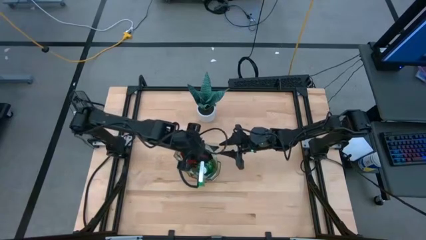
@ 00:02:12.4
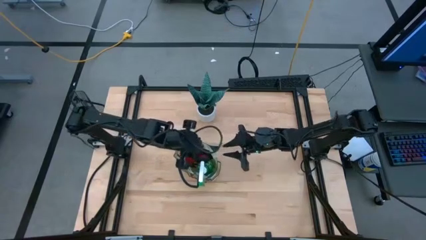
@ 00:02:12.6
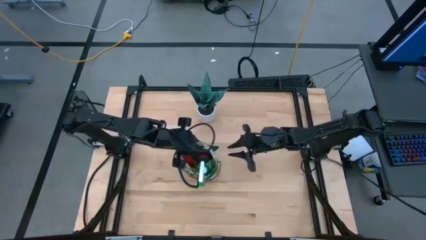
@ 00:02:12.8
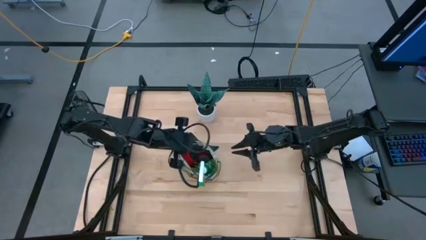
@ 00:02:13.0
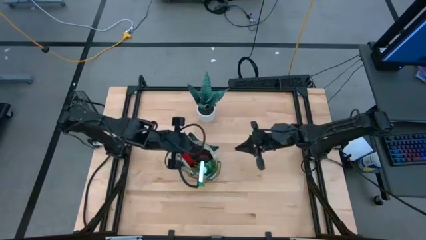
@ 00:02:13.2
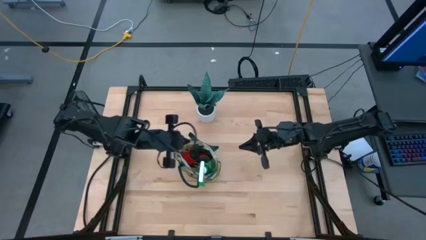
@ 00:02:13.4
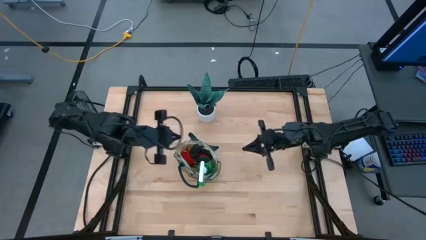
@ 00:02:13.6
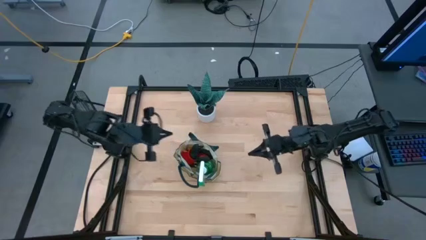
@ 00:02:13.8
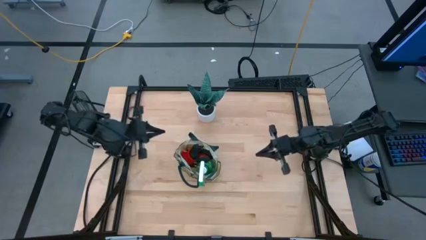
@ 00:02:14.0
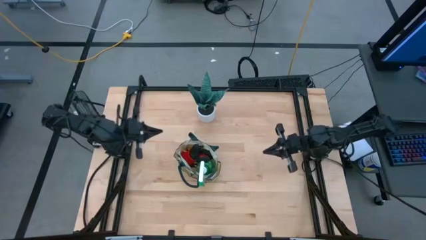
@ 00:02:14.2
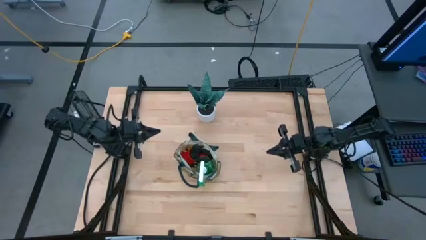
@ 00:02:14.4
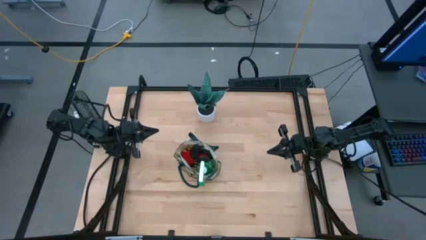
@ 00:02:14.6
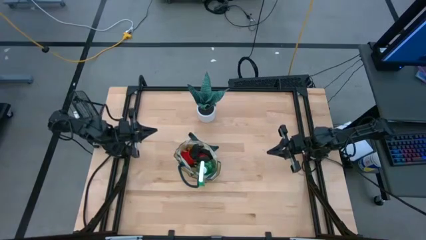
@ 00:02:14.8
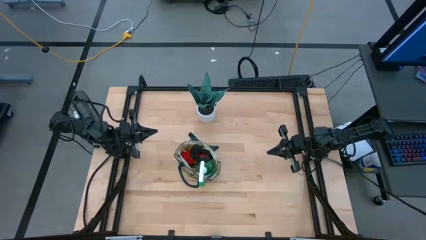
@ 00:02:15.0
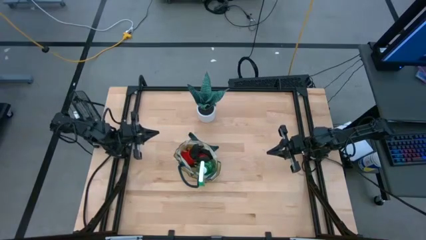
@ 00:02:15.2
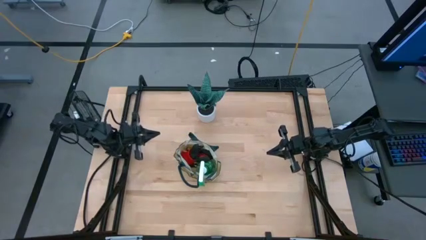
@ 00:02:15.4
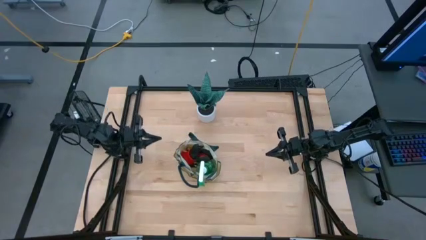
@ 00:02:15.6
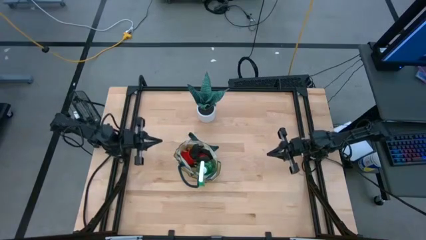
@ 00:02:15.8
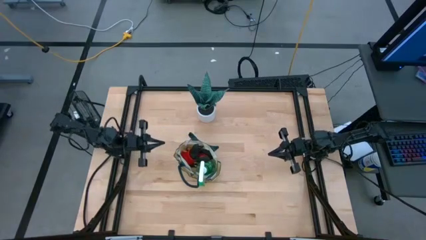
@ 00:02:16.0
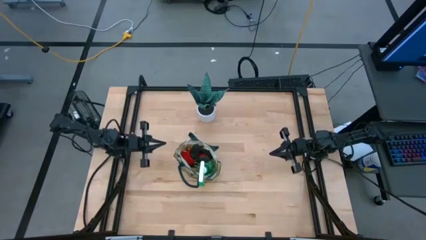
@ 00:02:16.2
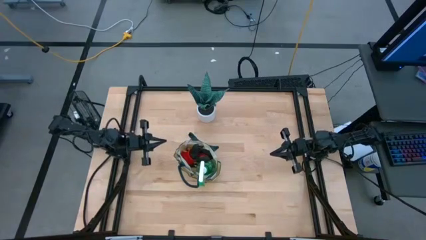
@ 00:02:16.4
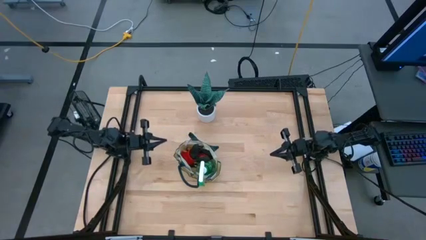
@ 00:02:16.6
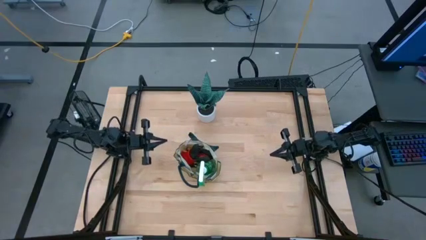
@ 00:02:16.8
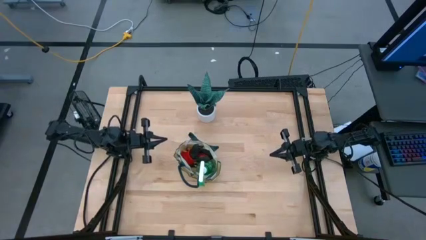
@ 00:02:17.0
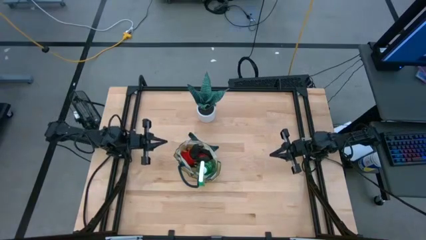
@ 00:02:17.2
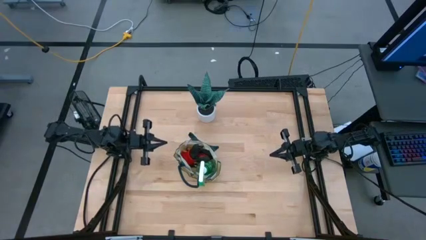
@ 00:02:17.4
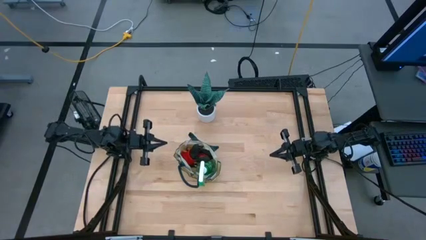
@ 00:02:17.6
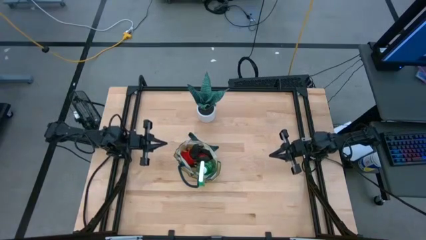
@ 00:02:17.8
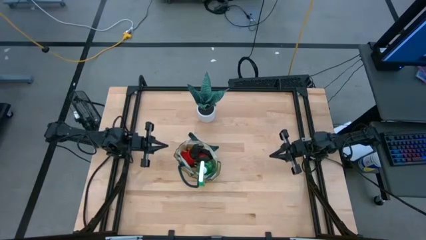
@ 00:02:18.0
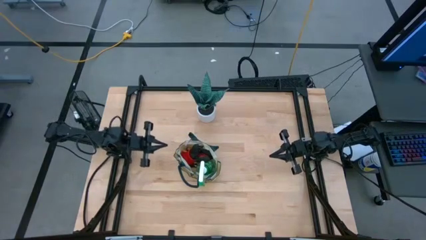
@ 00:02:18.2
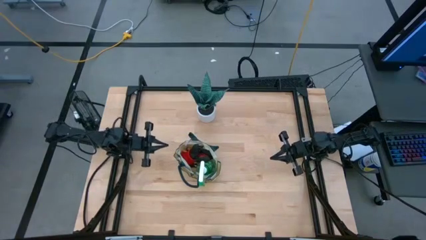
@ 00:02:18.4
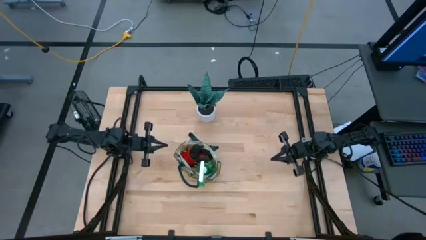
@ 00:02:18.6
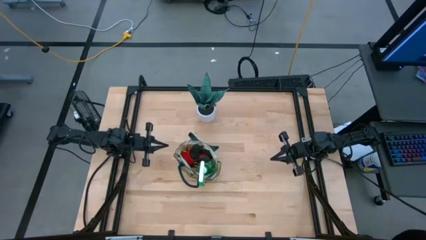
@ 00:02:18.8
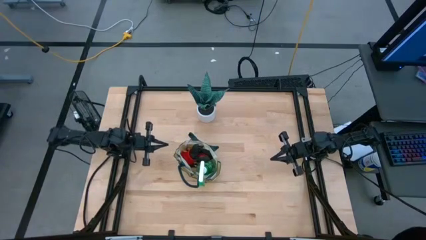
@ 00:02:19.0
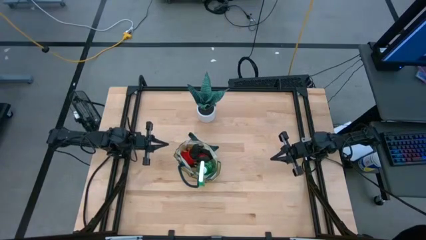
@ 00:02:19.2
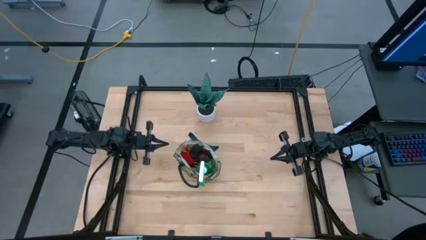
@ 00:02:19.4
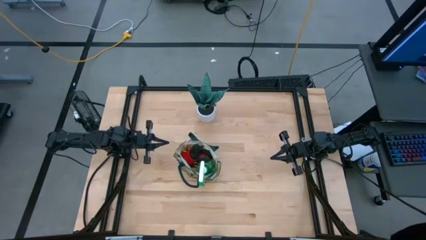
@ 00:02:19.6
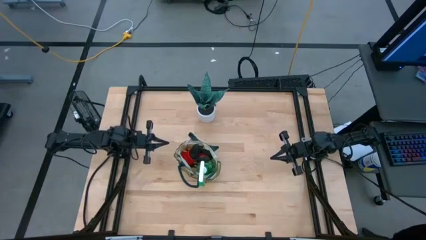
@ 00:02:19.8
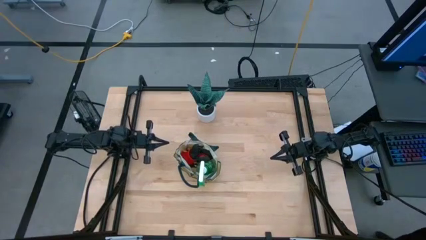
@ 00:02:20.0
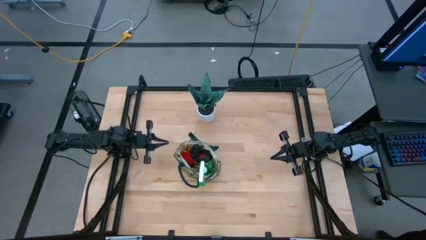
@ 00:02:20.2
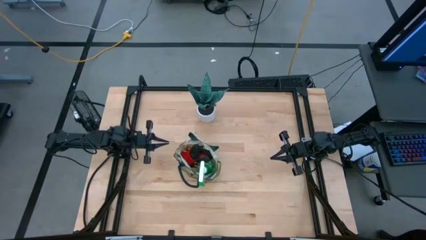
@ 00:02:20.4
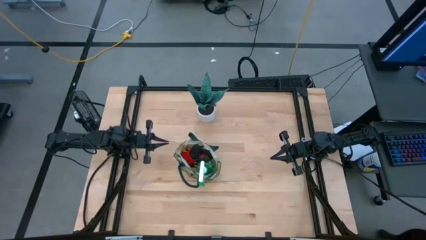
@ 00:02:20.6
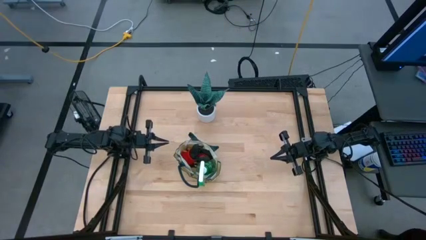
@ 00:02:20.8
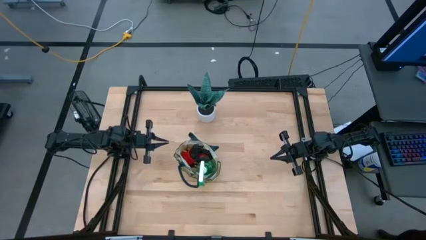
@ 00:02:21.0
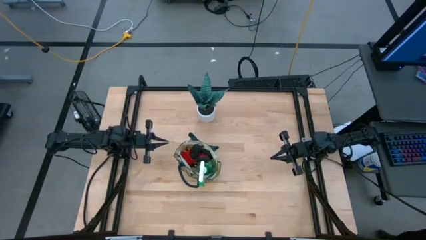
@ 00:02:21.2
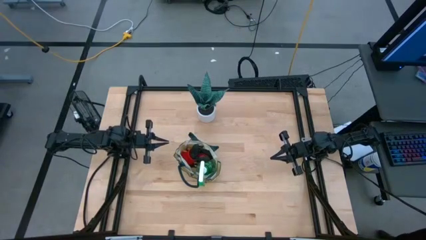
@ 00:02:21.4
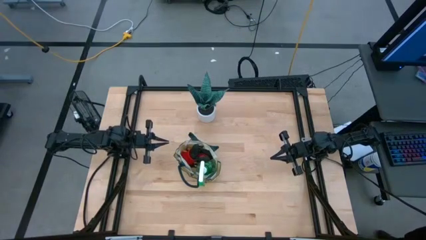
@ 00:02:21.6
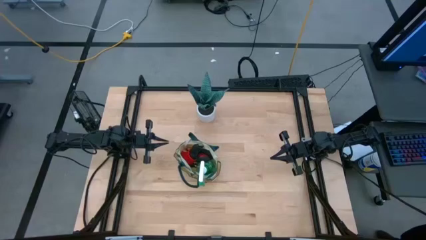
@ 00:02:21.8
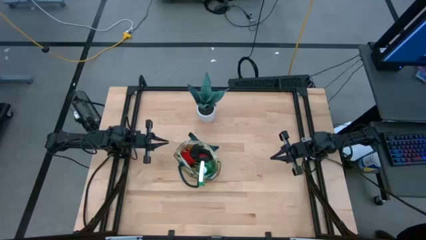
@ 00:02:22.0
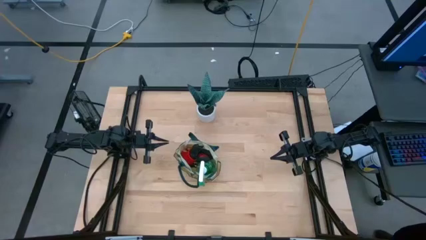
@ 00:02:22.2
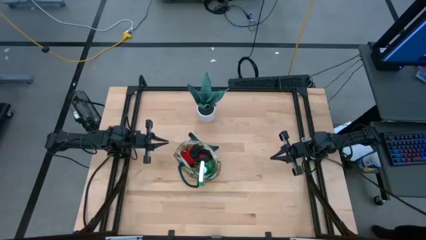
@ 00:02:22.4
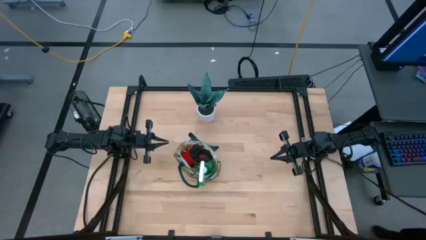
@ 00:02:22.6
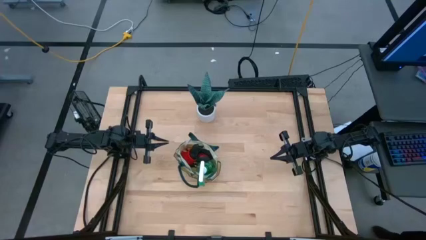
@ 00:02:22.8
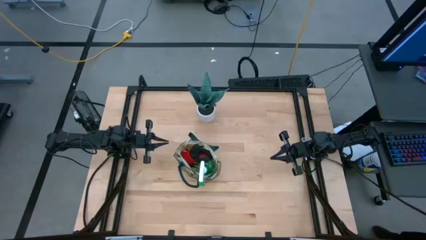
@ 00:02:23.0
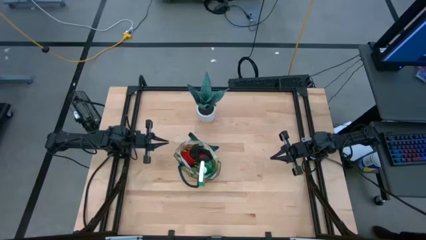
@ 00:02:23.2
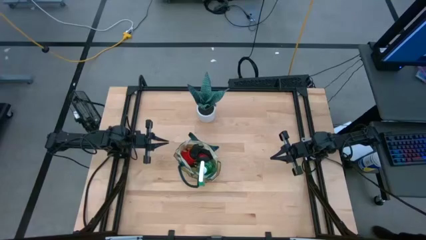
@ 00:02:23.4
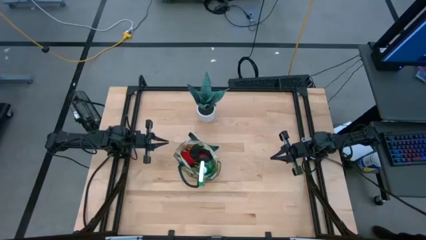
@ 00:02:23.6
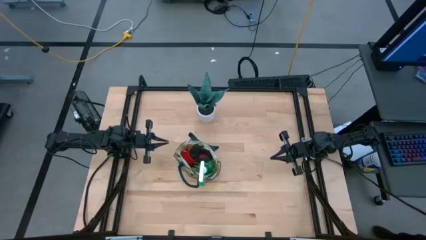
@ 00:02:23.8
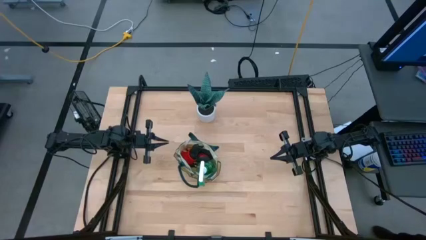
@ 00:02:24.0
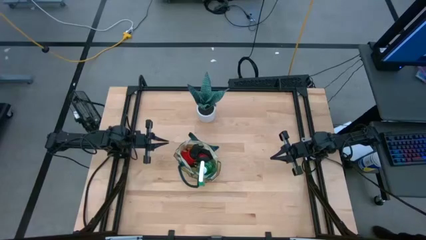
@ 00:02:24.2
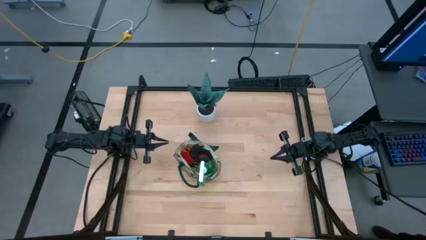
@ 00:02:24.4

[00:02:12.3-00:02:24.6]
Task: Pick & Place Garden tools in Gardening bag
Return to Home Position
